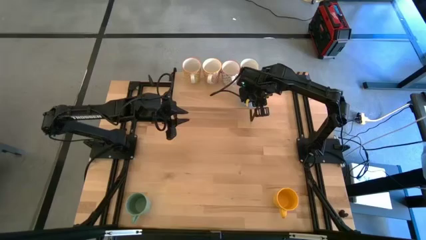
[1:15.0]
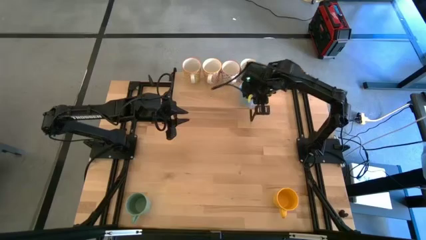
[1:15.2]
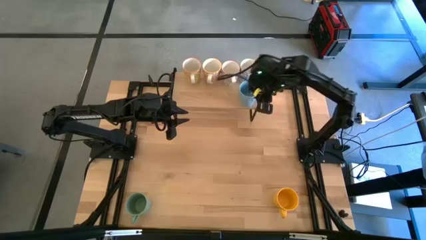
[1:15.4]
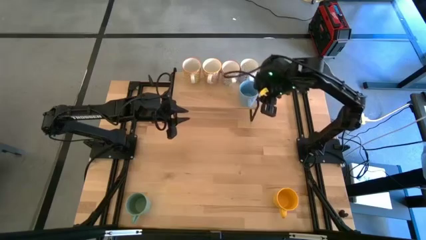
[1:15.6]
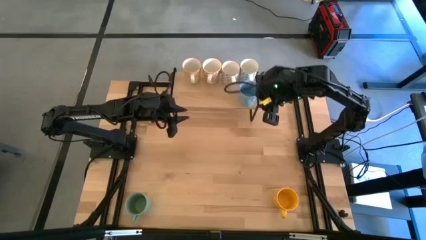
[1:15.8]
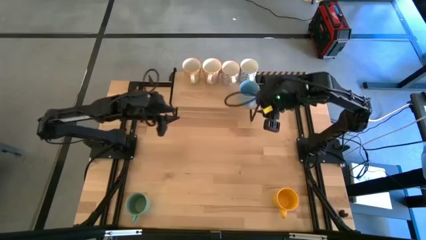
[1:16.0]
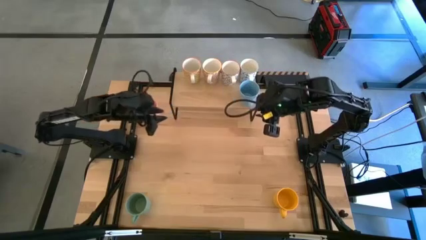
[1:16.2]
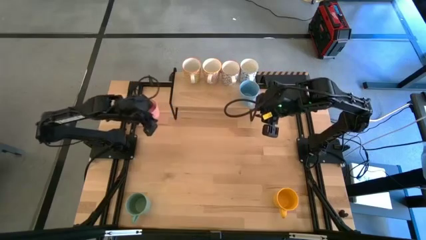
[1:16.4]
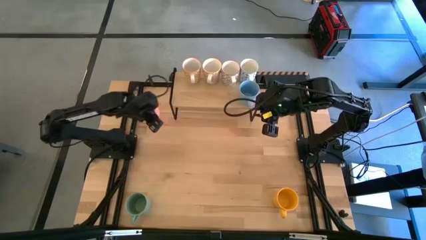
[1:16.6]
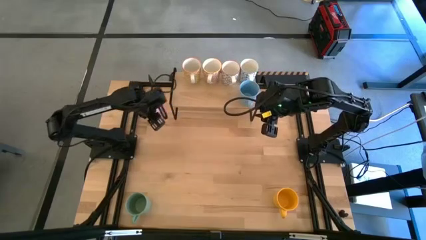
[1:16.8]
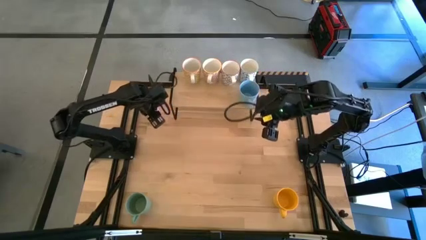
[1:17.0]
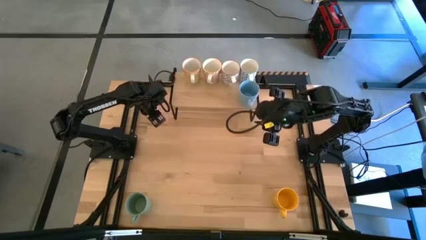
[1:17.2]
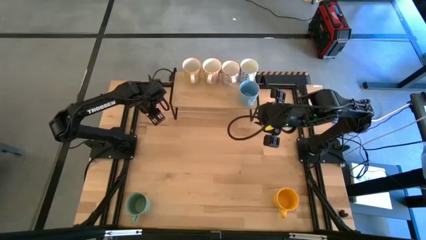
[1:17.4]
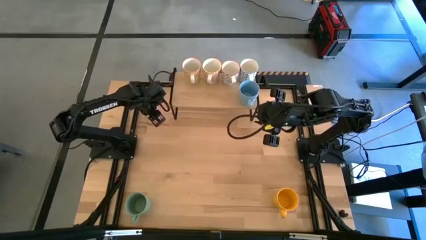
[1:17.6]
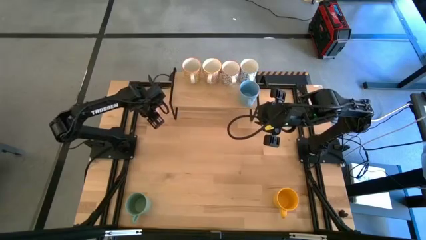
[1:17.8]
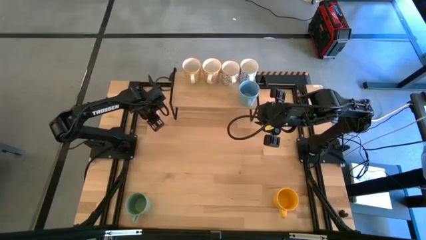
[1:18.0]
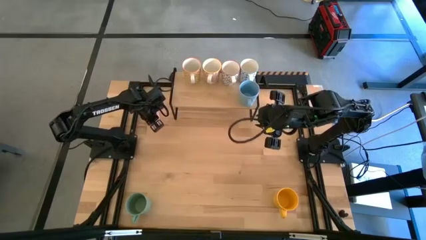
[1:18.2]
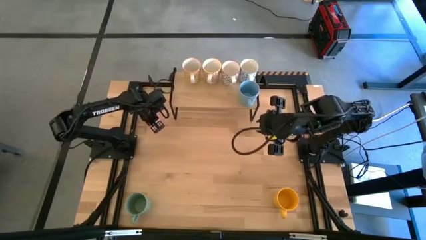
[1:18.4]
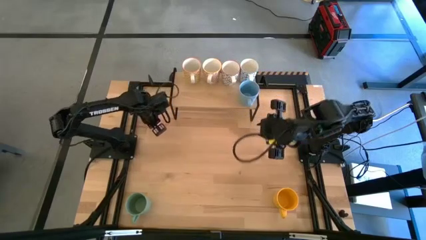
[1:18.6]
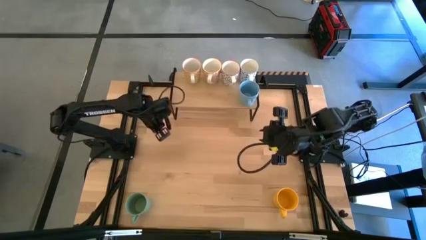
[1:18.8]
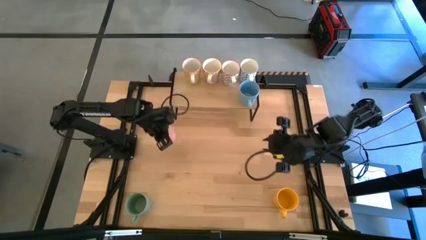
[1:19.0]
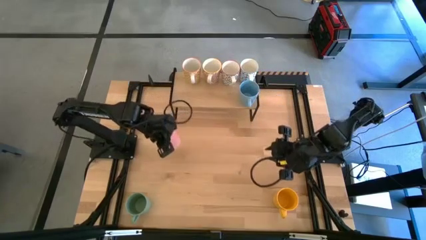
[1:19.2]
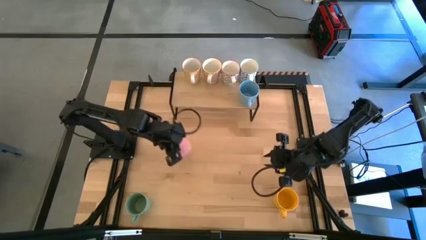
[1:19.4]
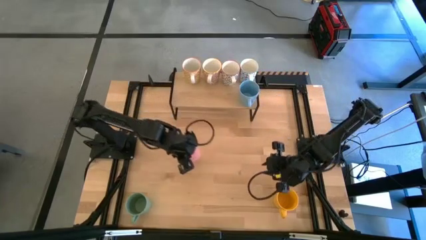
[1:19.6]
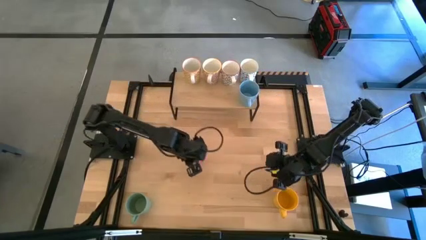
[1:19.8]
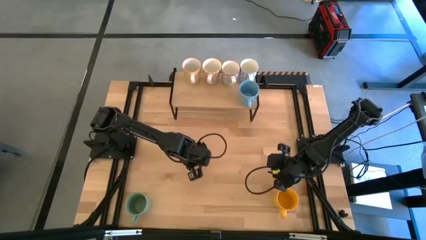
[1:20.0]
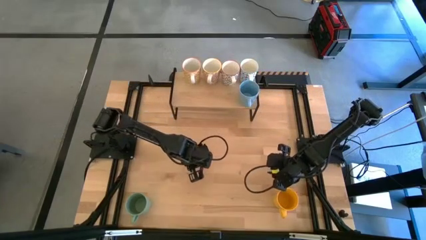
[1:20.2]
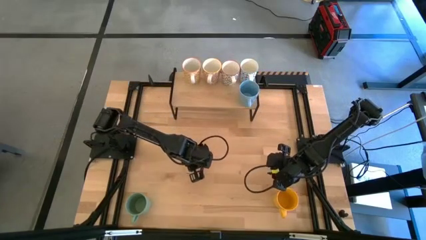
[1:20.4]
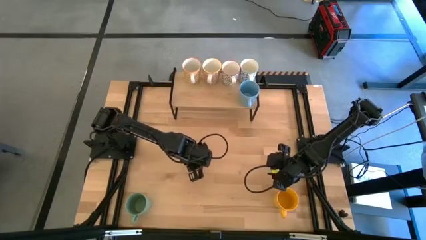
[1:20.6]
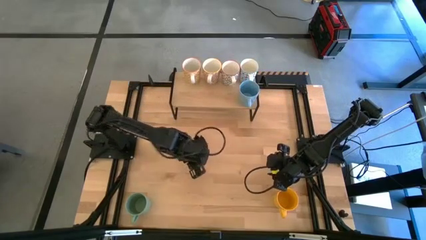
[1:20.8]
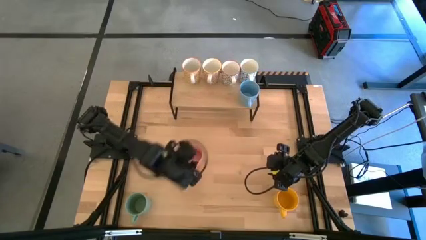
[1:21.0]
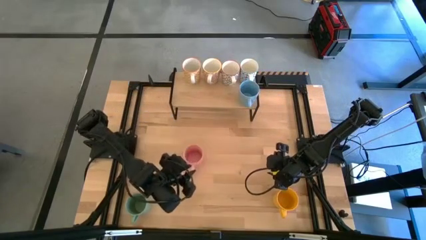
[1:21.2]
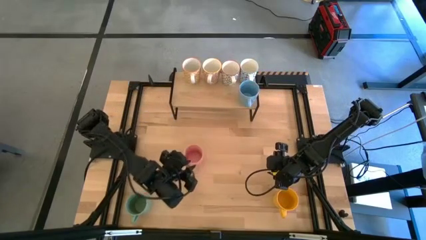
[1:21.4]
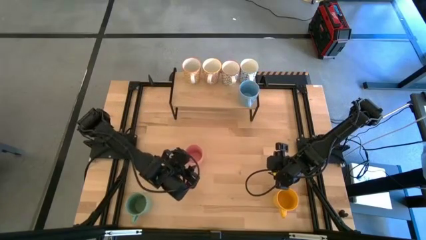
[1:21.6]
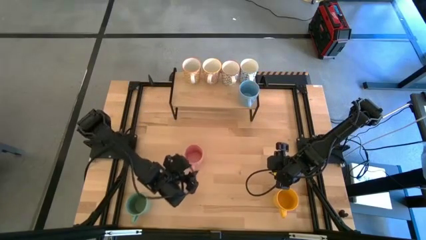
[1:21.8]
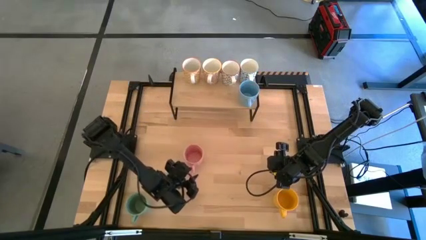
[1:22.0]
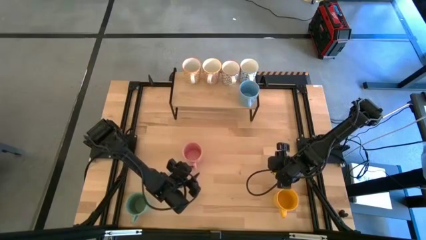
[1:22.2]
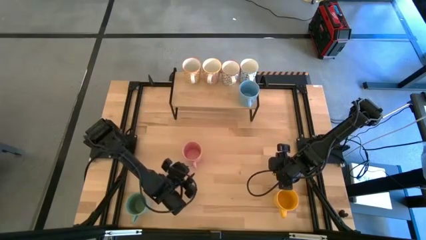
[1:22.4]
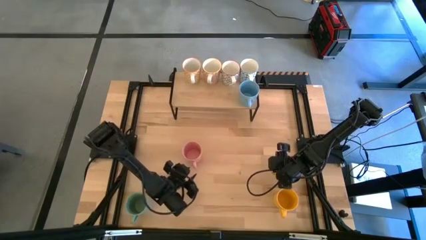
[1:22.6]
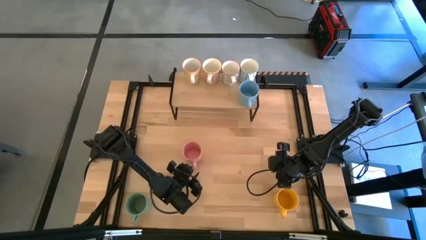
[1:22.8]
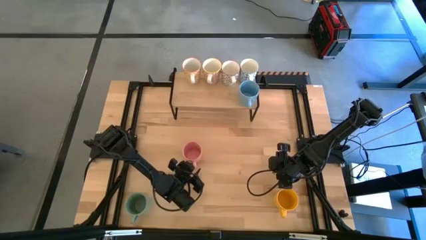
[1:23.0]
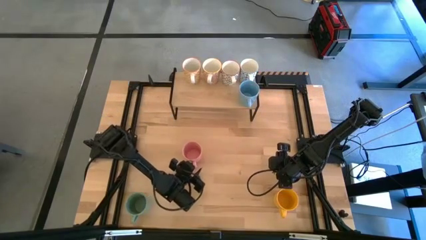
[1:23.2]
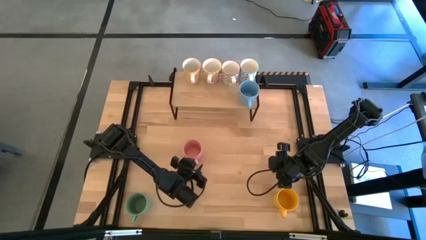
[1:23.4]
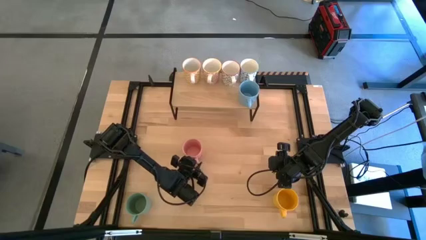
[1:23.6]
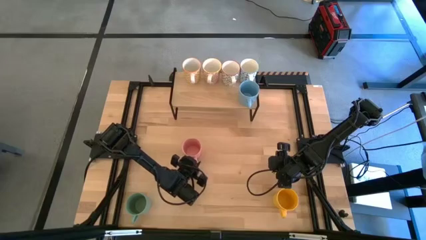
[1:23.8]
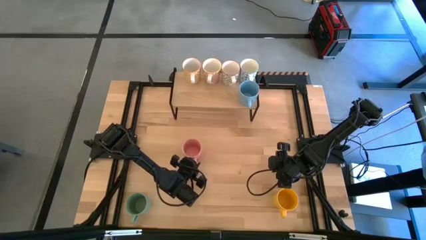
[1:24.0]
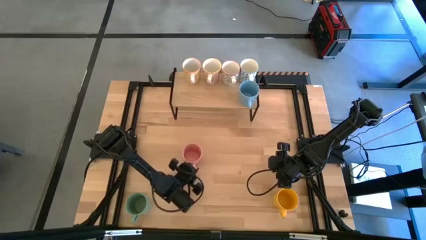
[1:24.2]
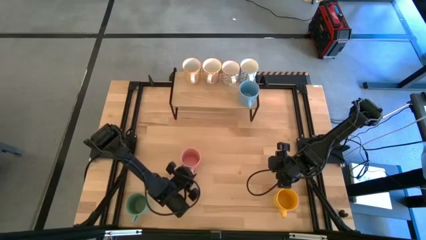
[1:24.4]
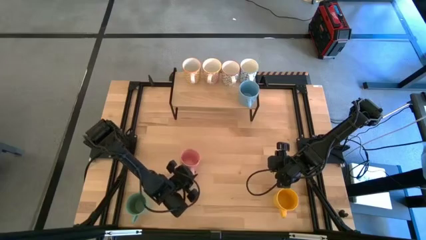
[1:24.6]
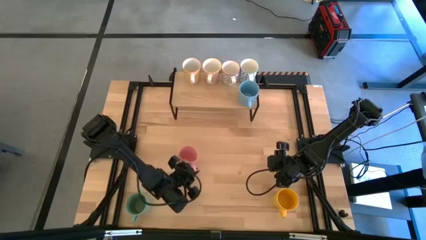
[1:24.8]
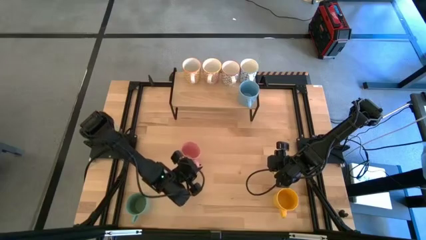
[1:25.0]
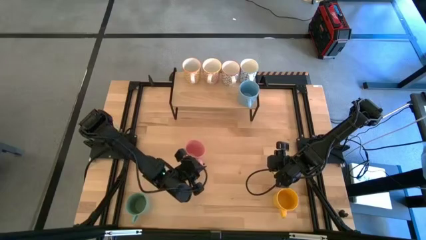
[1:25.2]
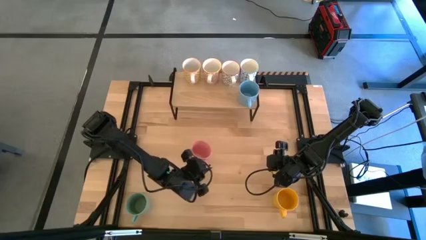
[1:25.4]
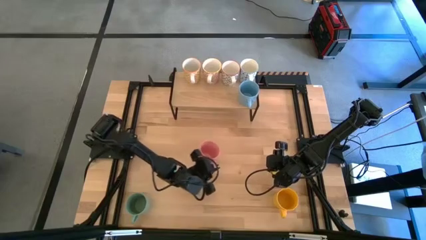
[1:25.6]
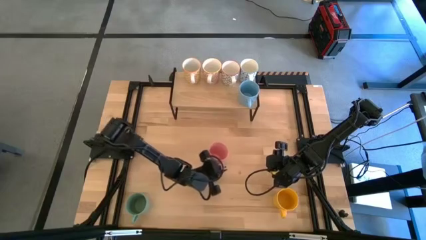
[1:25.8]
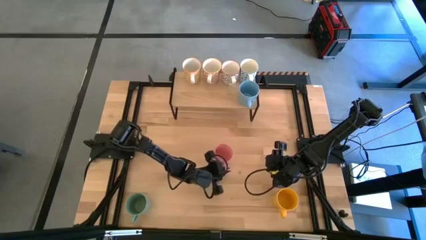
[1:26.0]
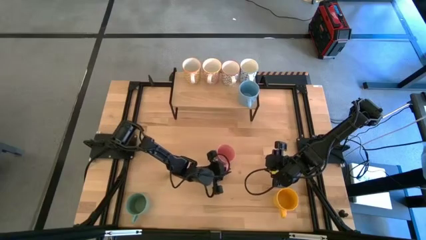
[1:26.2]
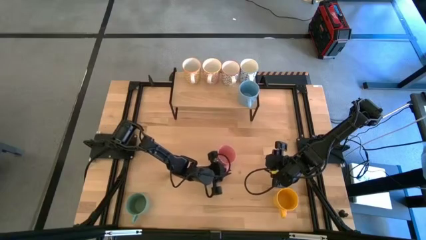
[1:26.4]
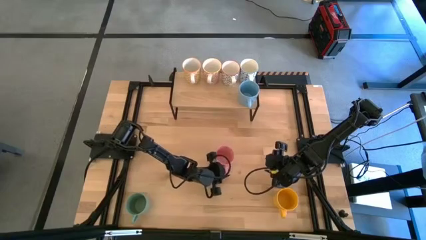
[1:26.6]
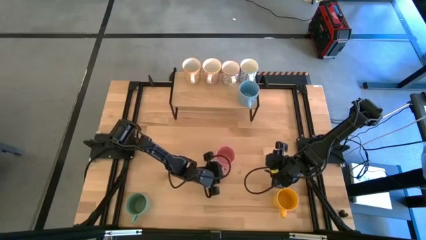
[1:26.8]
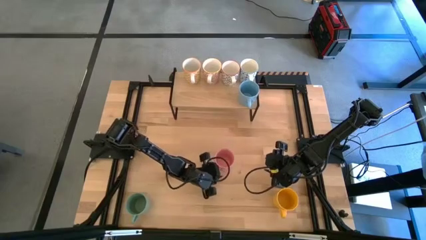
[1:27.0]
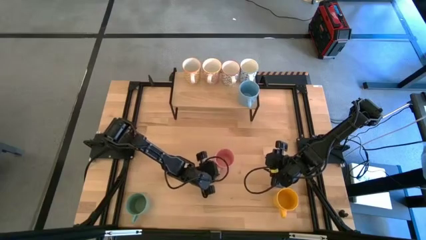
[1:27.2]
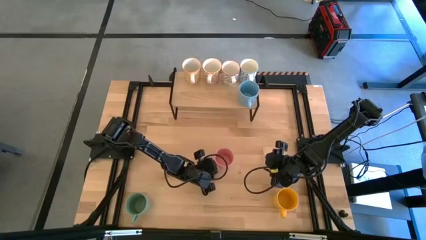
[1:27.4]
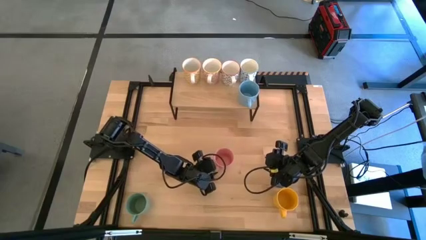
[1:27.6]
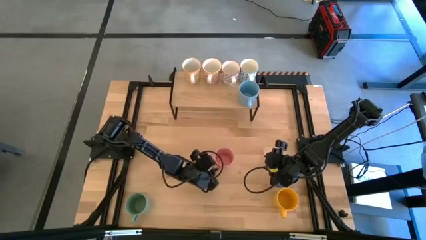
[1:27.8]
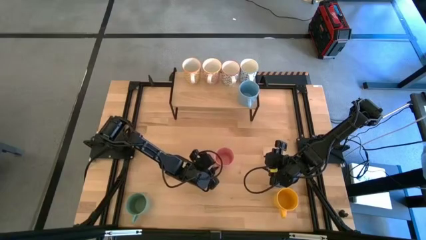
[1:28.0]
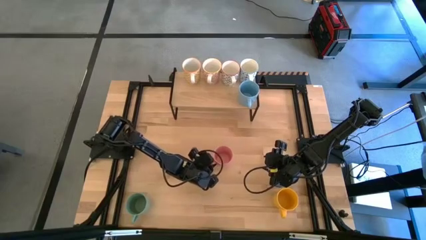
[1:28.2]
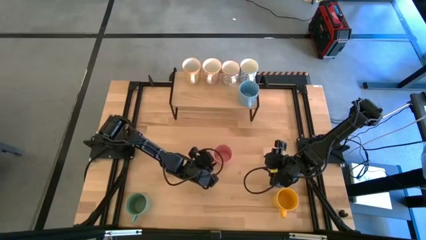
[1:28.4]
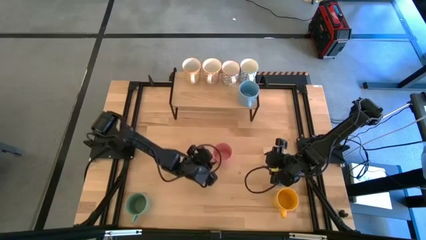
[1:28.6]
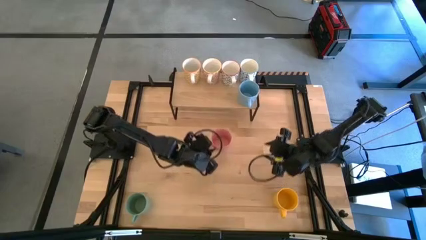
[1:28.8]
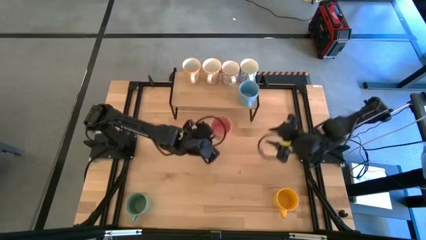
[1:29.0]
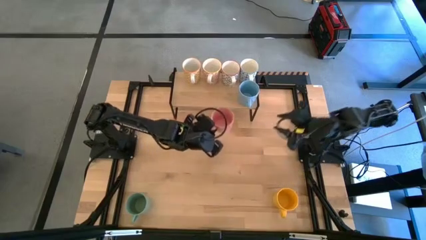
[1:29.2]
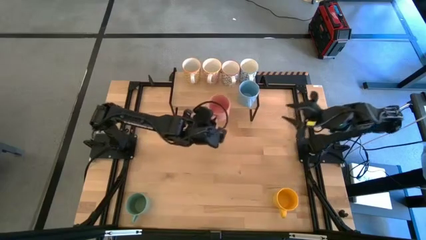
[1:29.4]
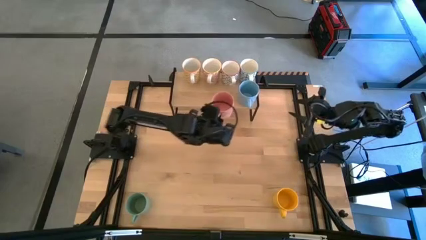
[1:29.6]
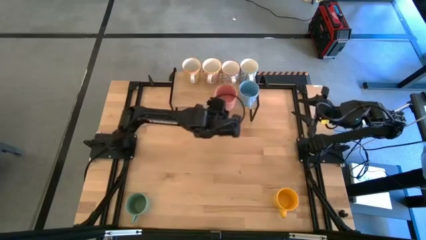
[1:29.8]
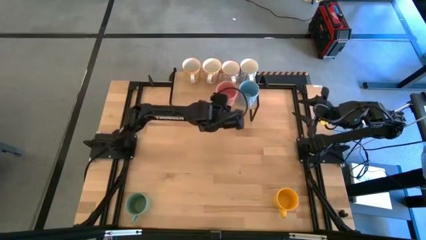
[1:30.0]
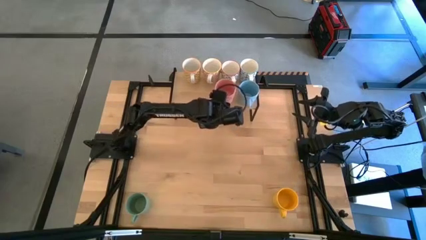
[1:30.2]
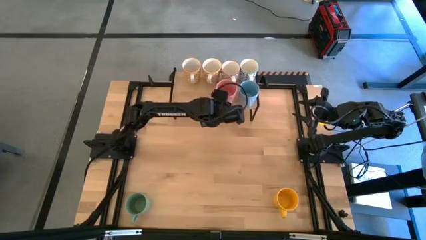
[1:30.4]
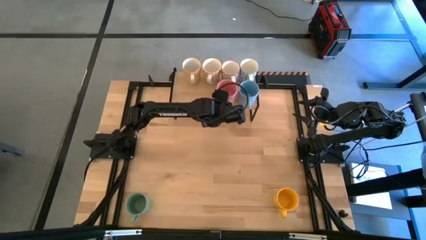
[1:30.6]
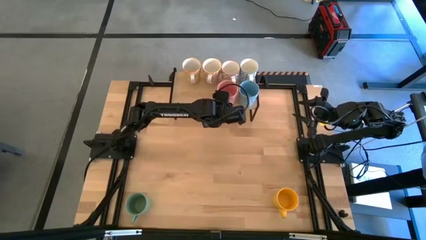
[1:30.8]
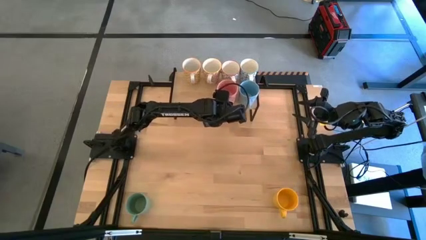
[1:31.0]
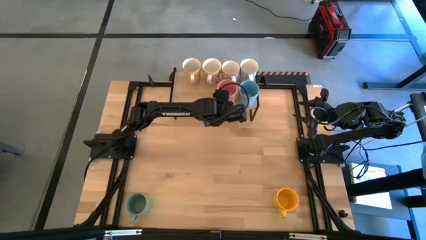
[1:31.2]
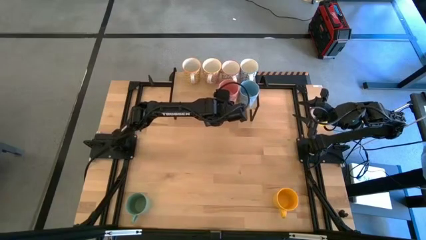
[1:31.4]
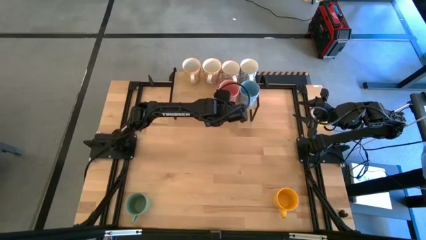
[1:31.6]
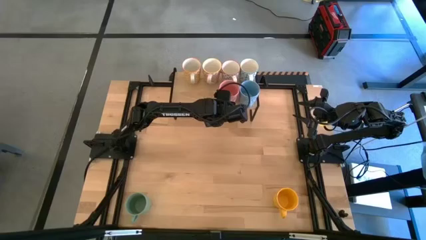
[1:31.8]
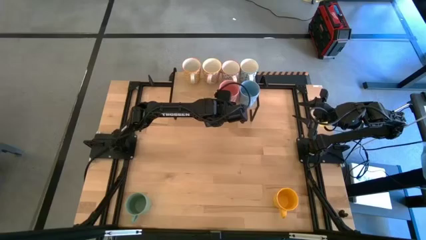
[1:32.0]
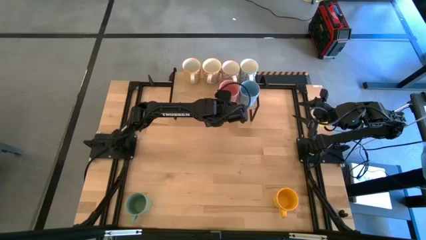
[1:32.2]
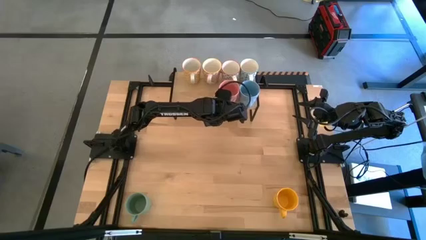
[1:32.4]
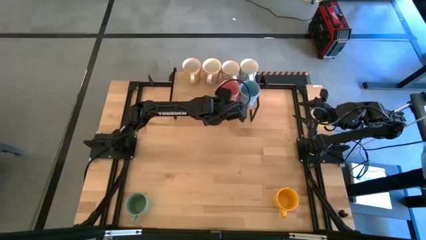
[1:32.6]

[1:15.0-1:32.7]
Task: Place coffee mugs
Put the pink mug on the shelf
